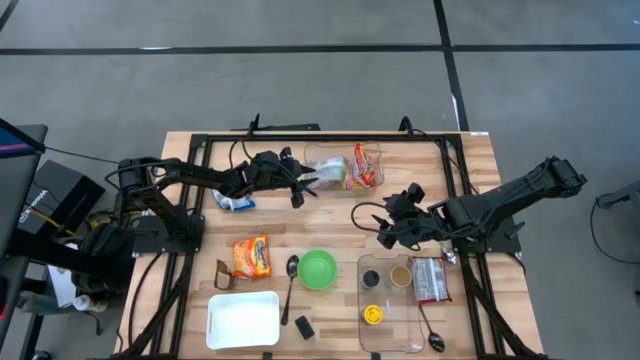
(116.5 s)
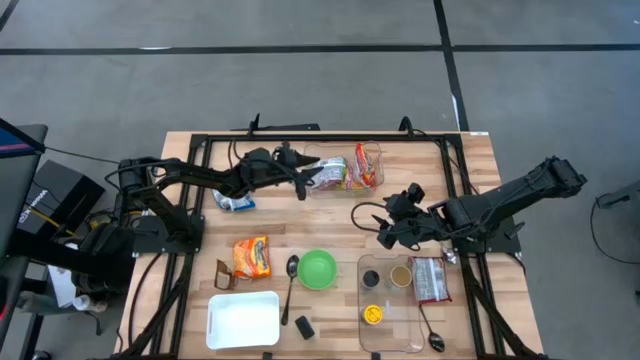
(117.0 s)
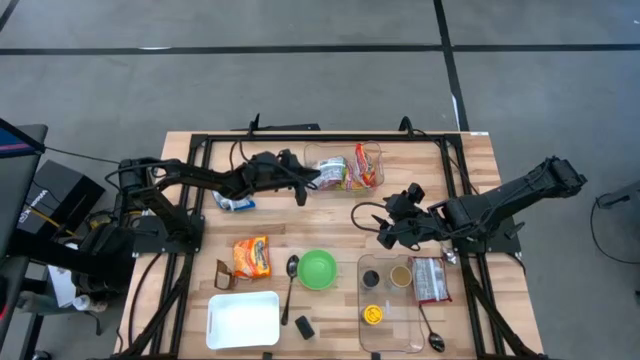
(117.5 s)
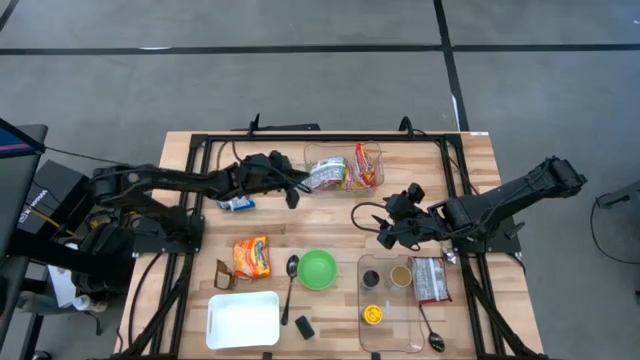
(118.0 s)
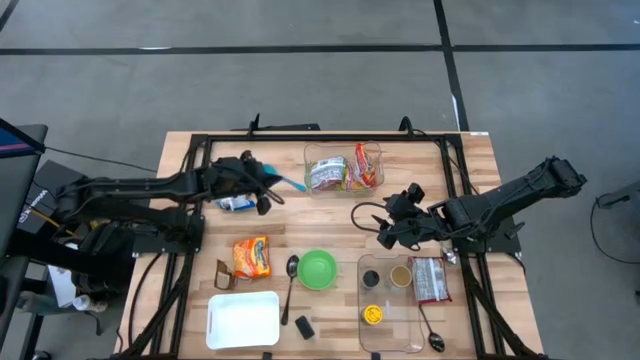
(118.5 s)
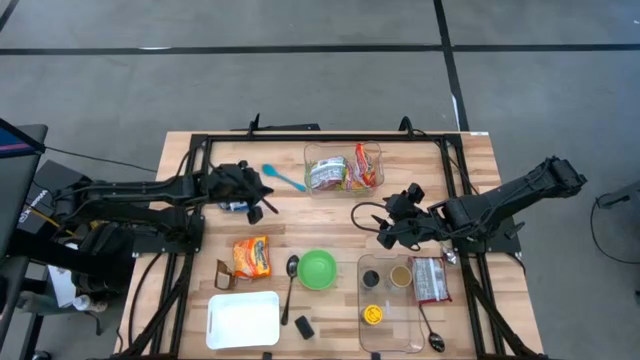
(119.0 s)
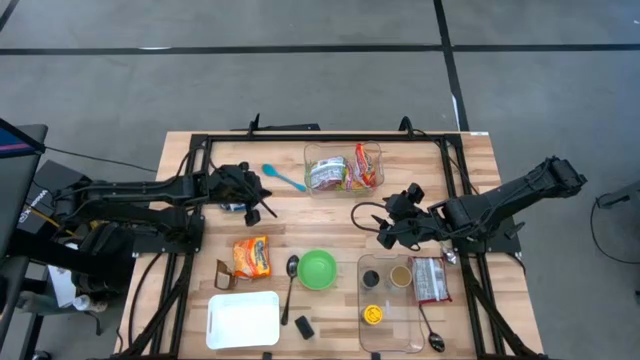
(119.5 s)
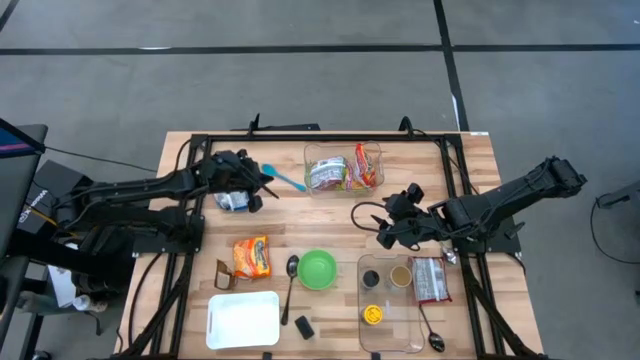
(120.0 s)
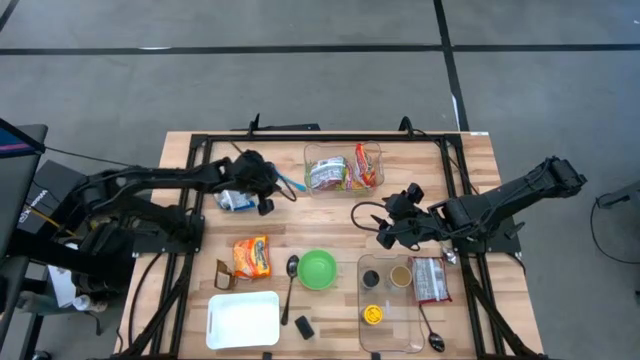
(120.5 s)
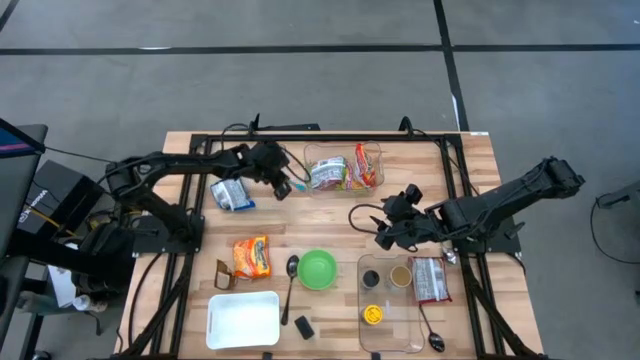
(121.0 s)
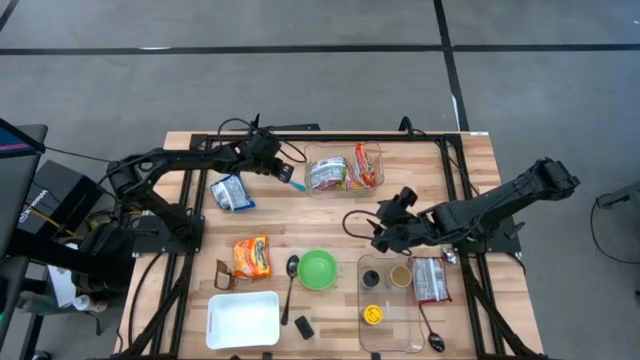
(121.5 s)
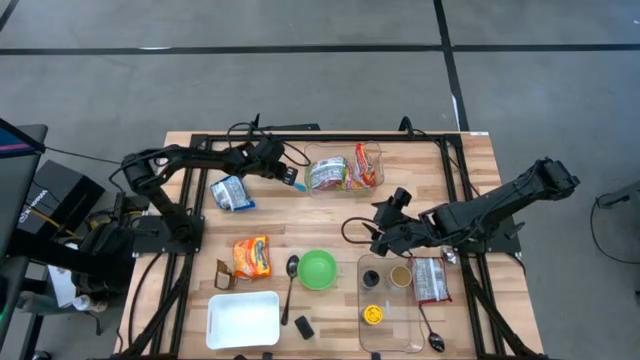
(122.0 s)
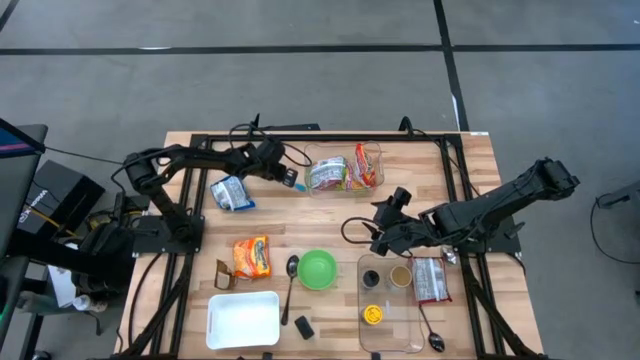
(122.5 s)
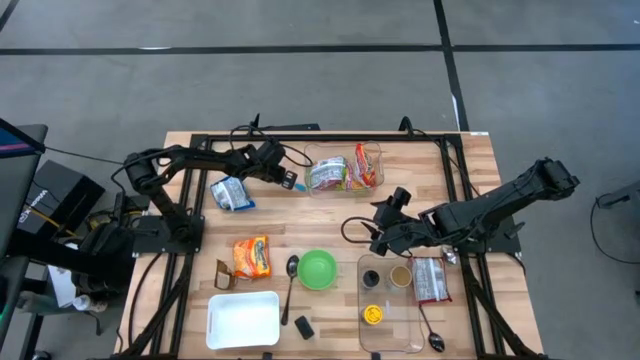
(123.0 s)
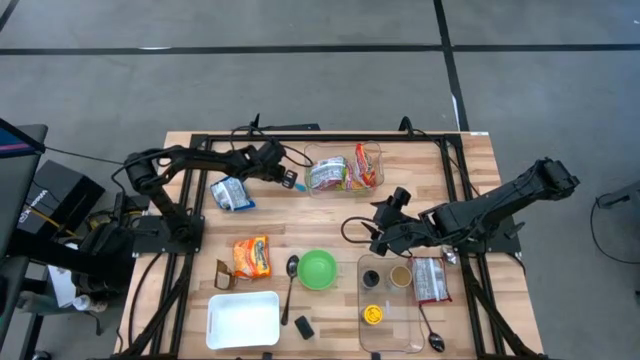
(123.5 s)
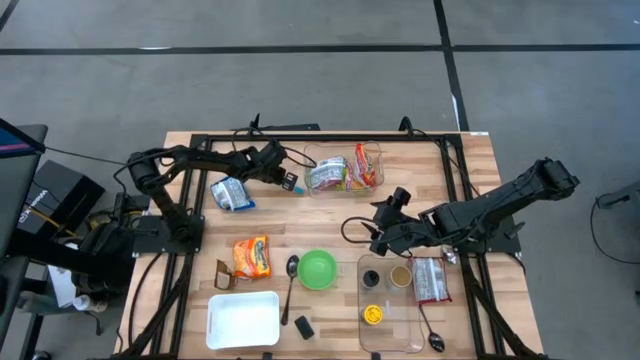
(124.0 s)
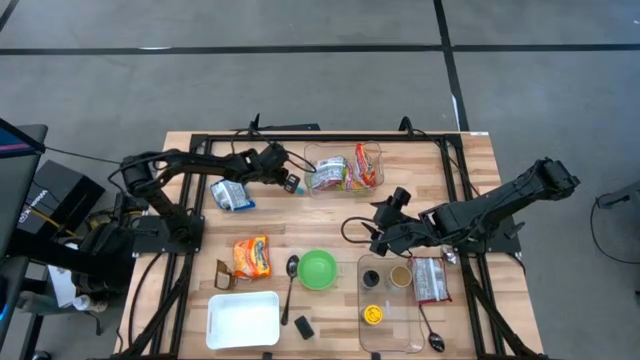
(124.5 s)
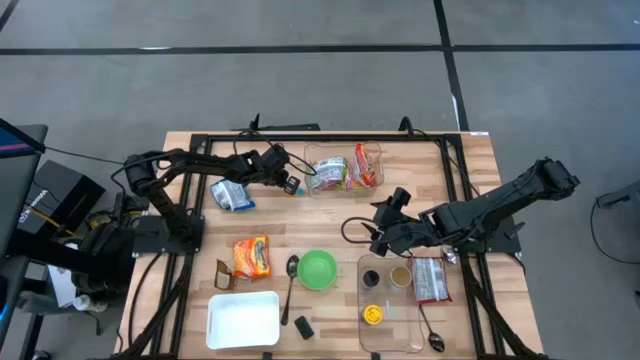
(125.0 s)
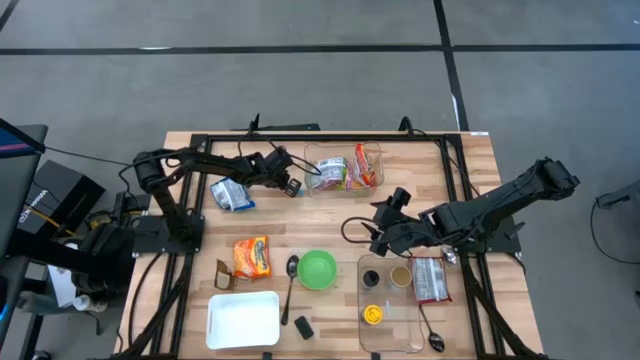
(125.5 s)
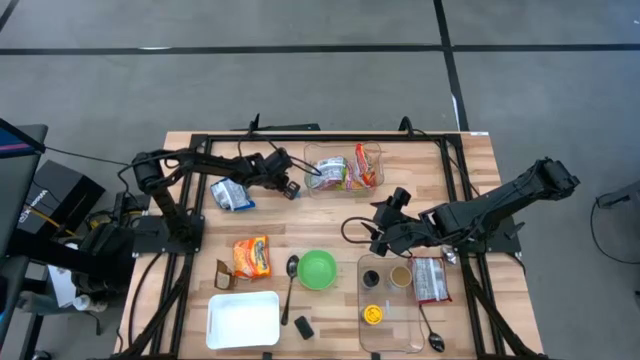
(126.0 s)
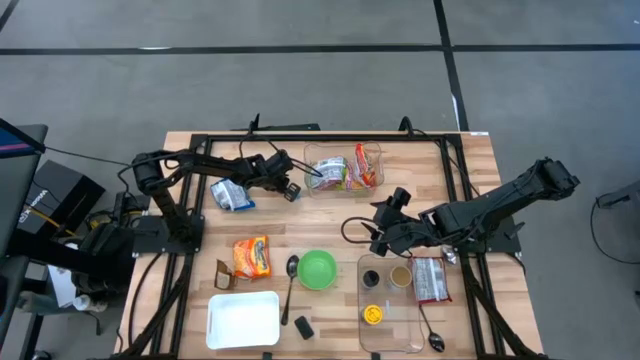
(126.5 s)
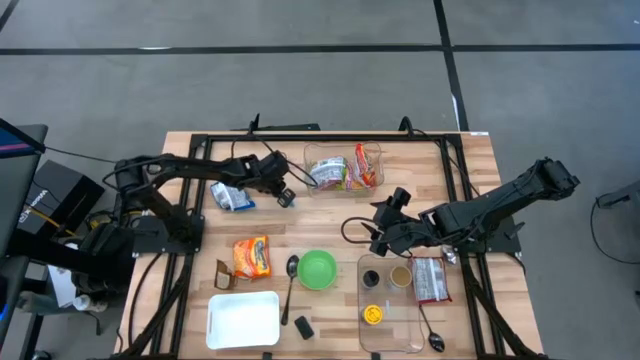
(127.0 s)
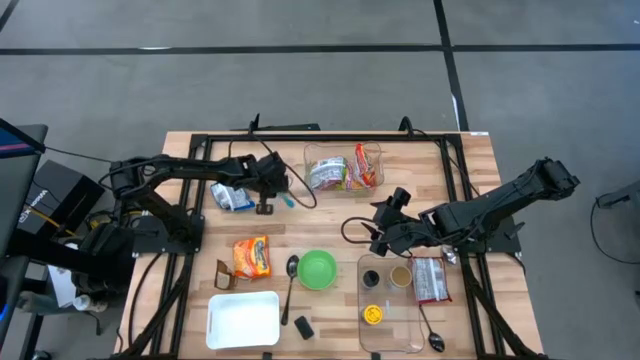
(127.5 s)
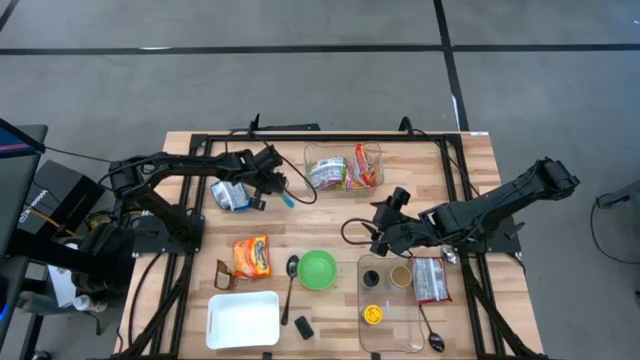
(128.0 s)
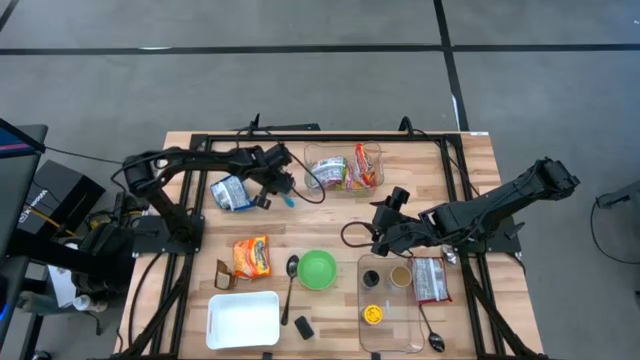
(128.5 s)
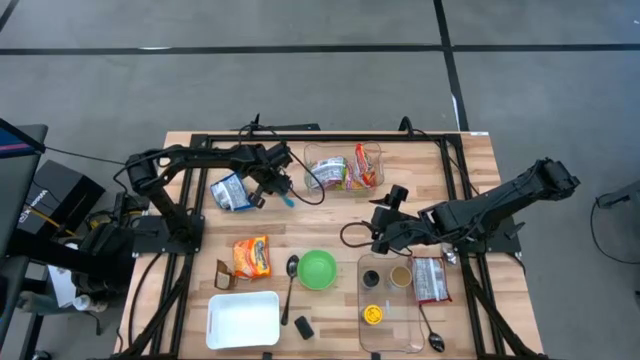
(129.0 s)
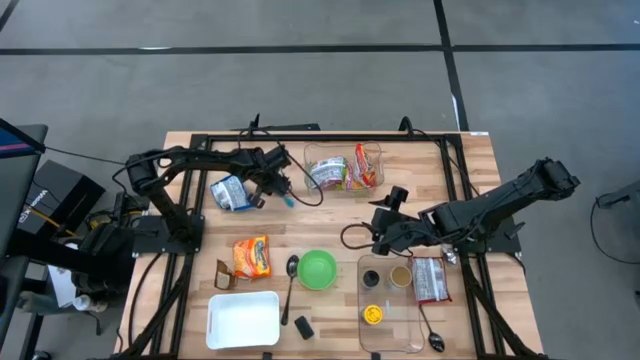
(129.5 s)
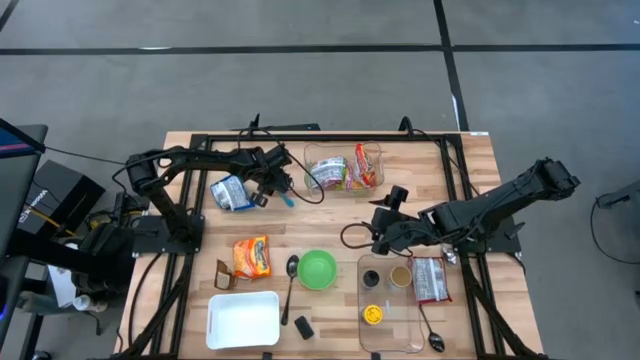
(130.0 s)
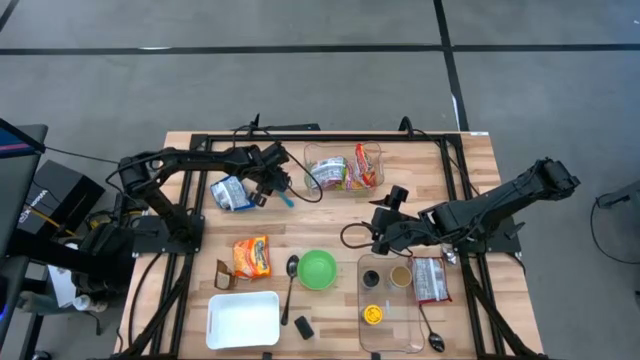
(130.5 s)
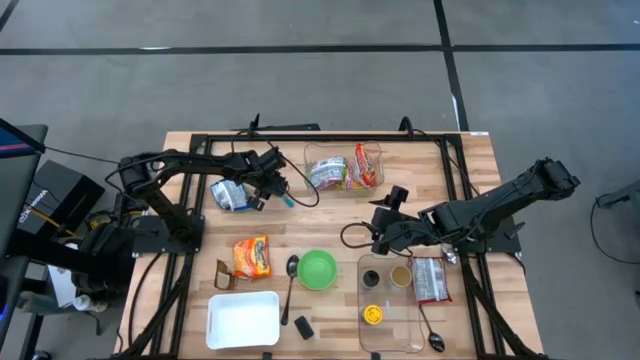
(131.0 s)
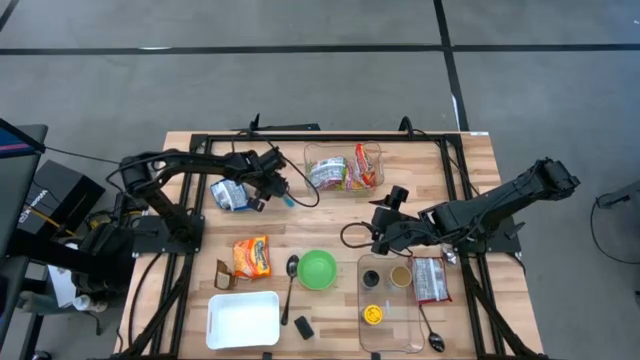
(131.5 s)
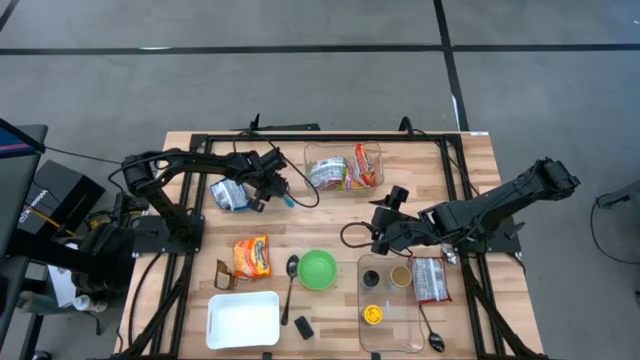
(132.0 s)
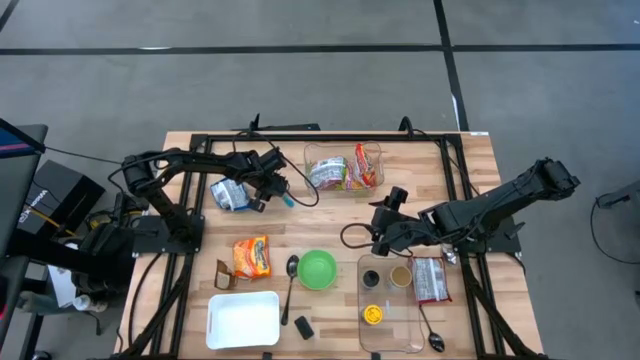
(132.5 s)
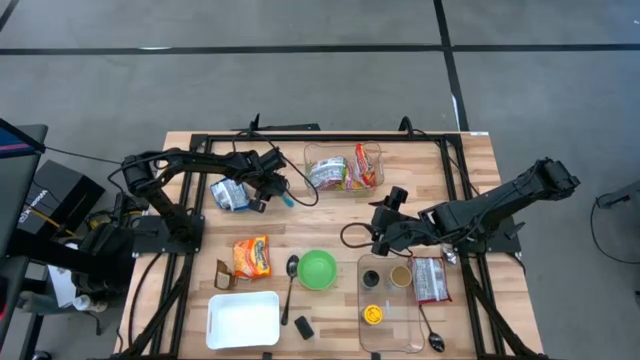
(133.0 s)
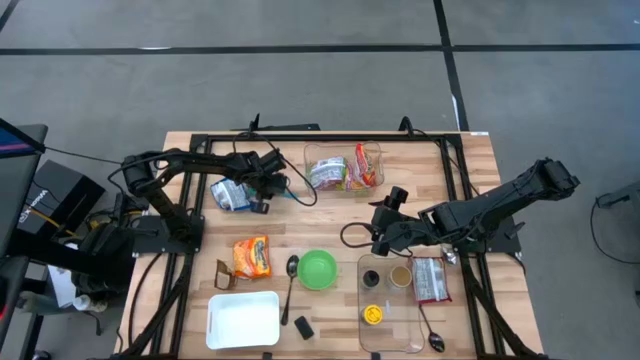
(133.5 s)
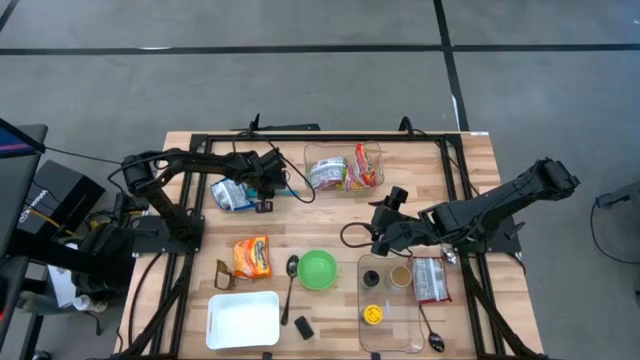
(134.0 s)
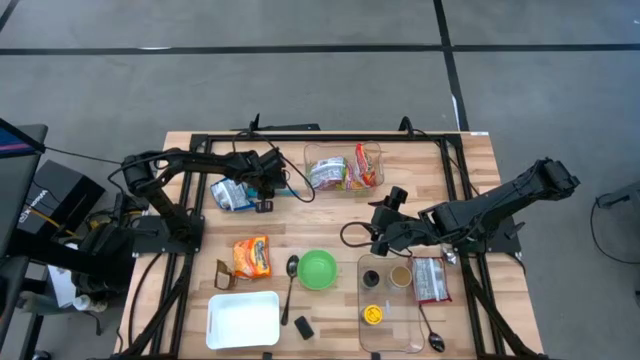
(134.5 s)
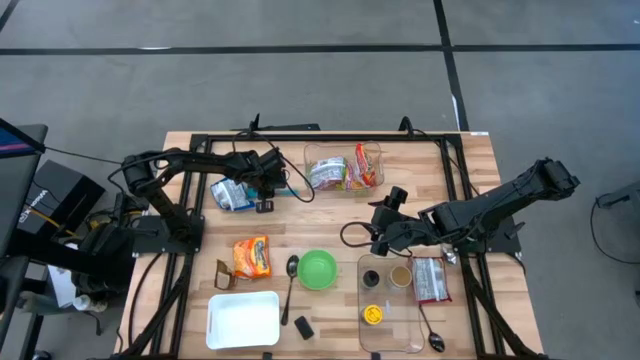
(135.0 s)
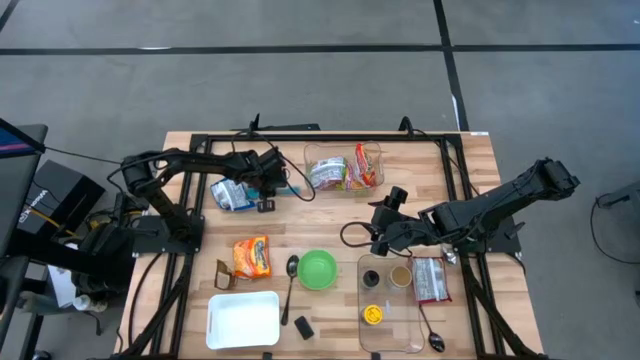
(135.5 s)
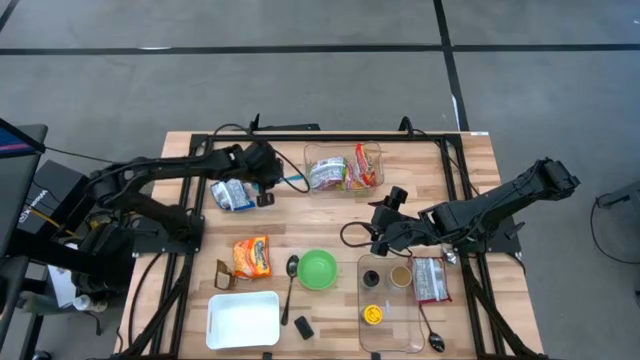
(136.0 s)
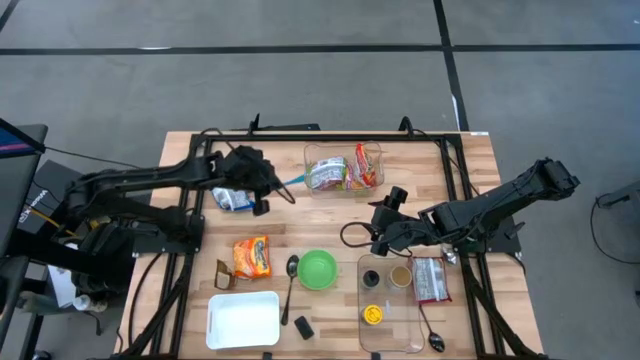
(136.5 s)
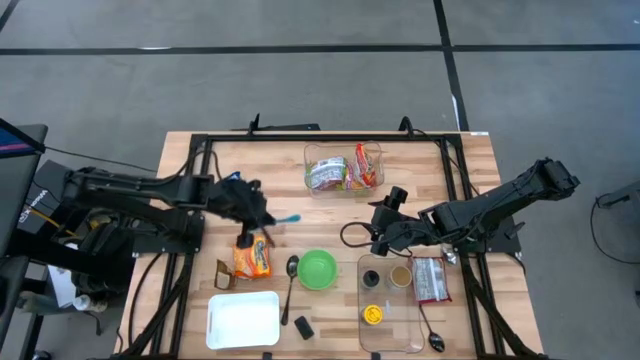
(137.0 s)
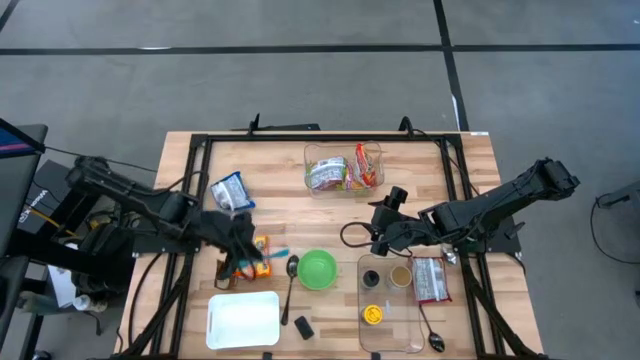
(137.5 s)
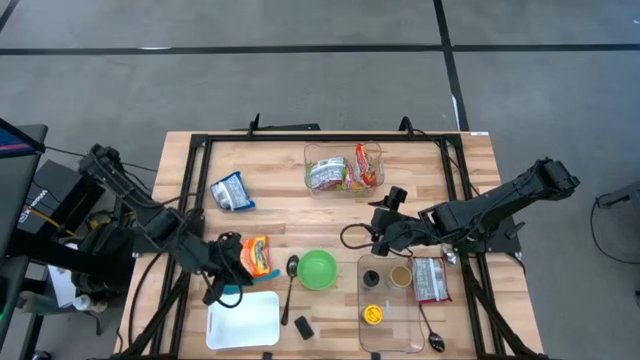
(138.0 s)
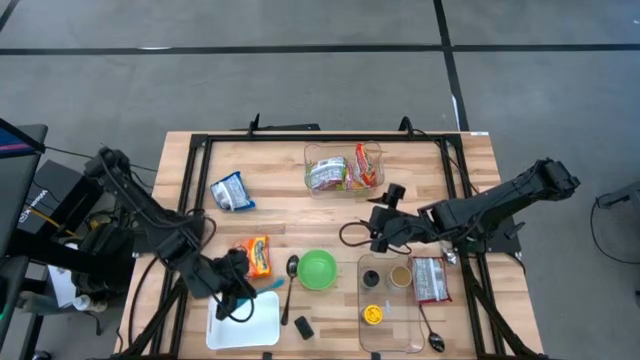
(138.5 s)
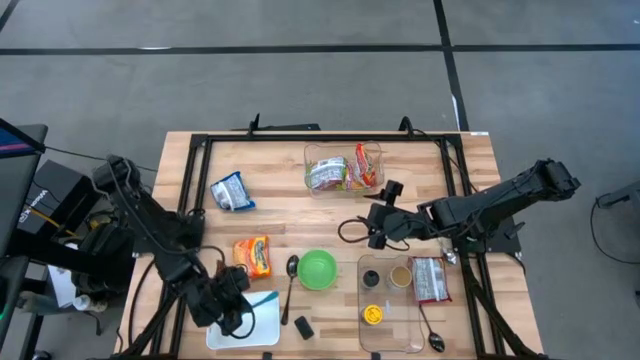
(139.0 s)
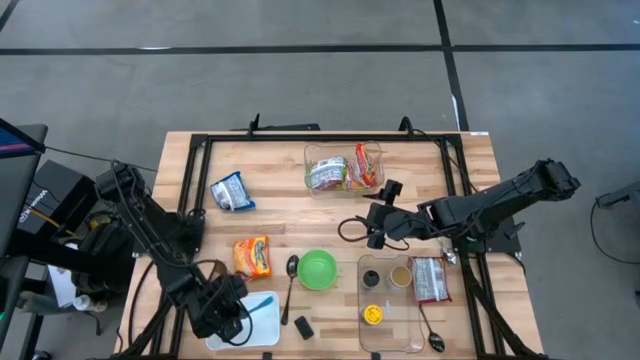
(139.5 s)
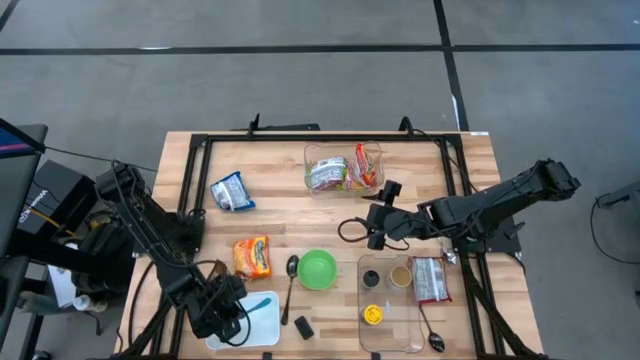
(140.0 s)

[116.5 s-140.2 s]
Task: Pick & Place Food Item
Put the blue baby spoon into the white bin
